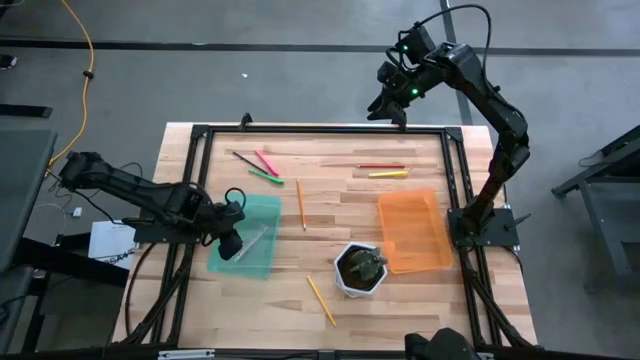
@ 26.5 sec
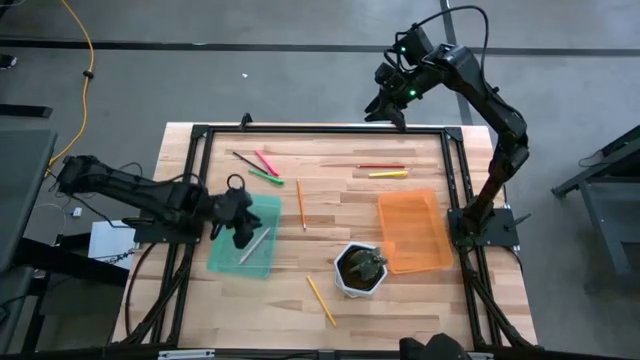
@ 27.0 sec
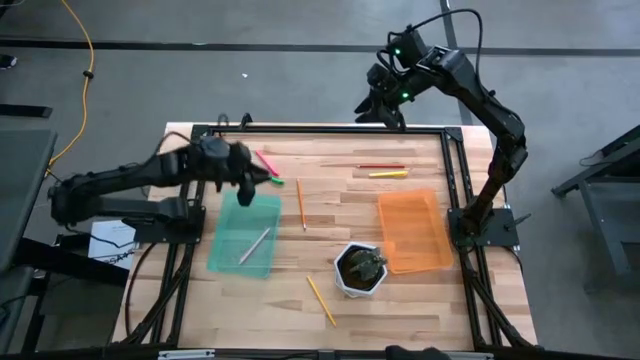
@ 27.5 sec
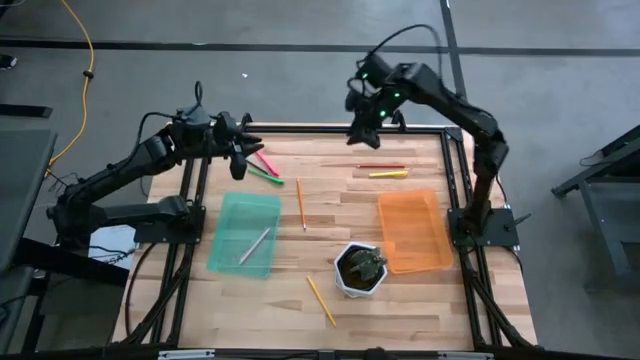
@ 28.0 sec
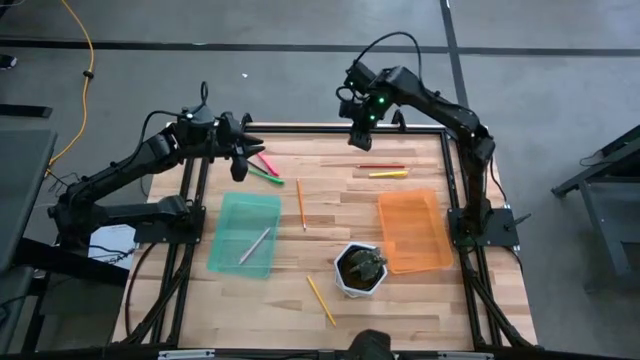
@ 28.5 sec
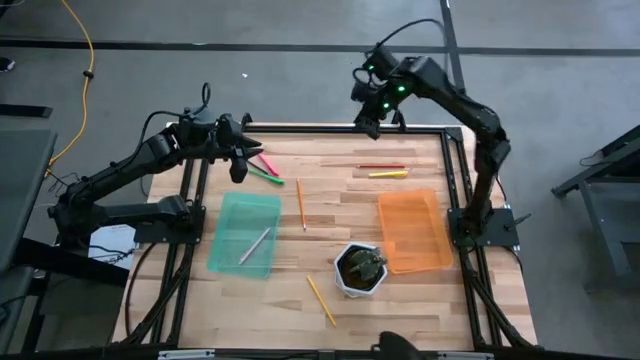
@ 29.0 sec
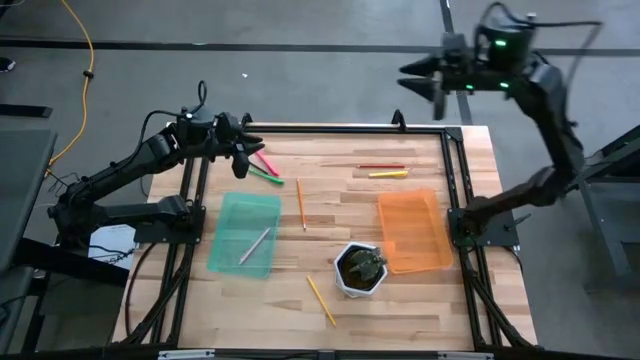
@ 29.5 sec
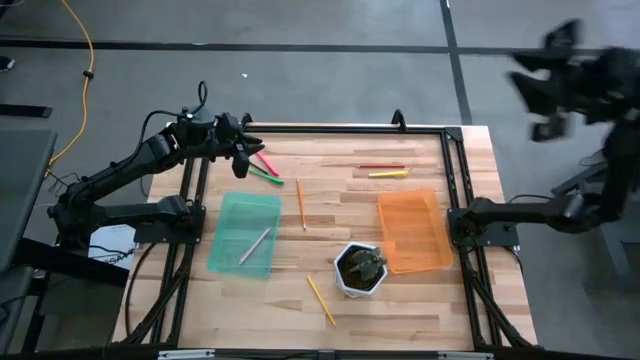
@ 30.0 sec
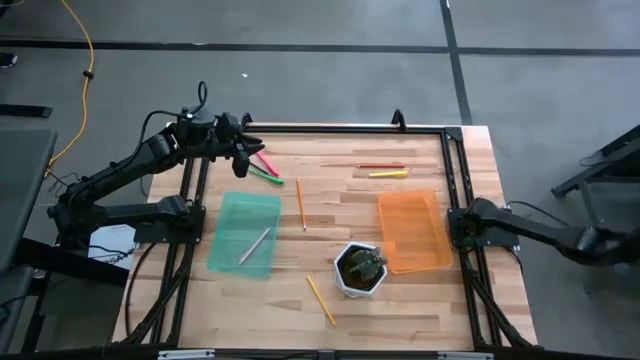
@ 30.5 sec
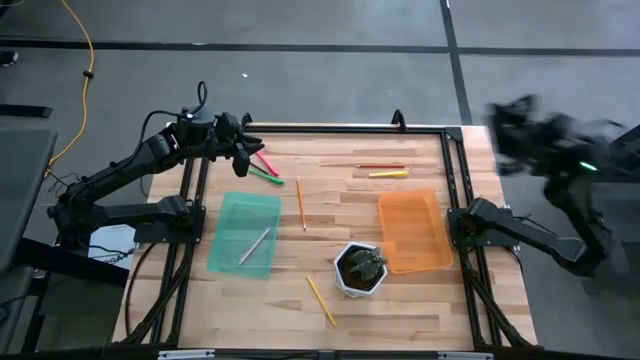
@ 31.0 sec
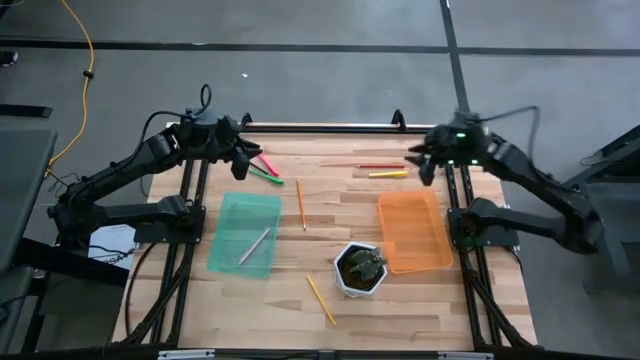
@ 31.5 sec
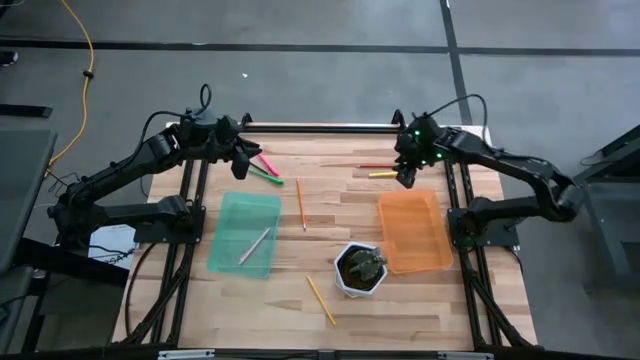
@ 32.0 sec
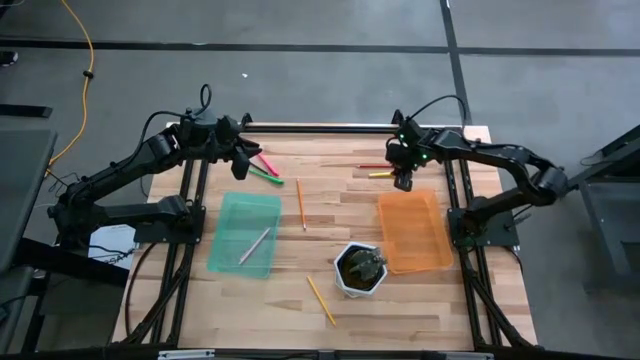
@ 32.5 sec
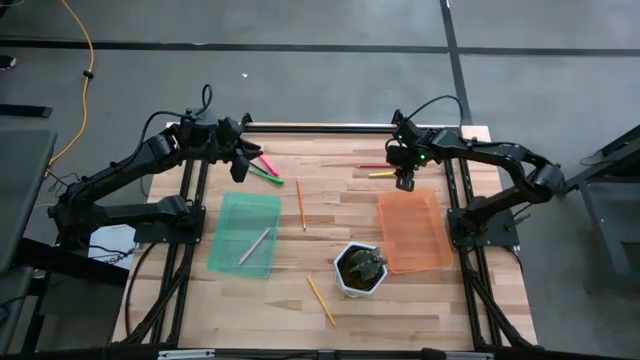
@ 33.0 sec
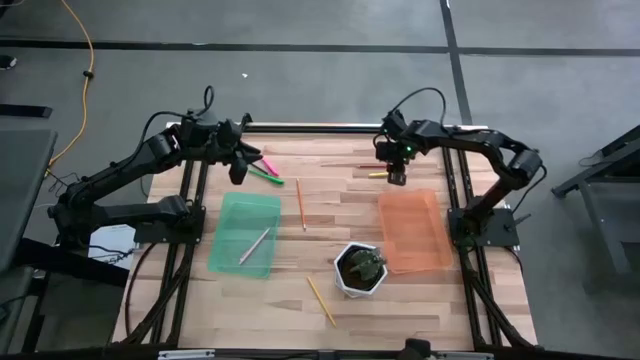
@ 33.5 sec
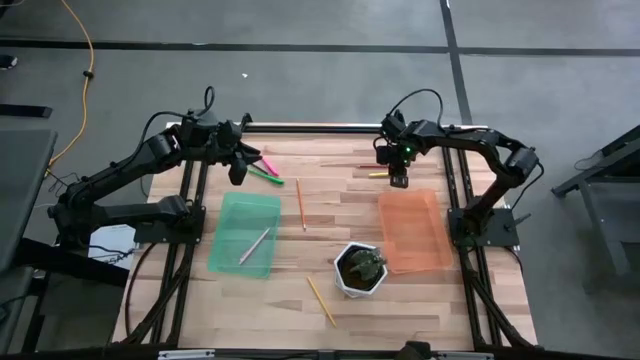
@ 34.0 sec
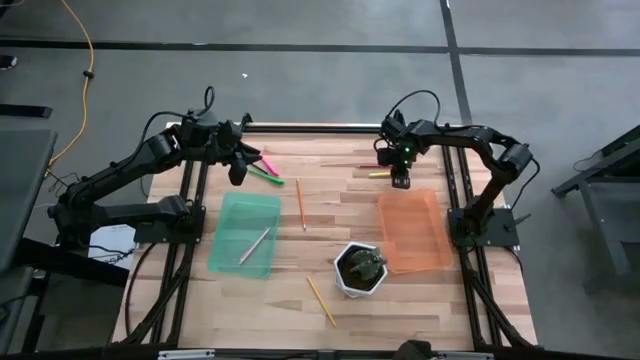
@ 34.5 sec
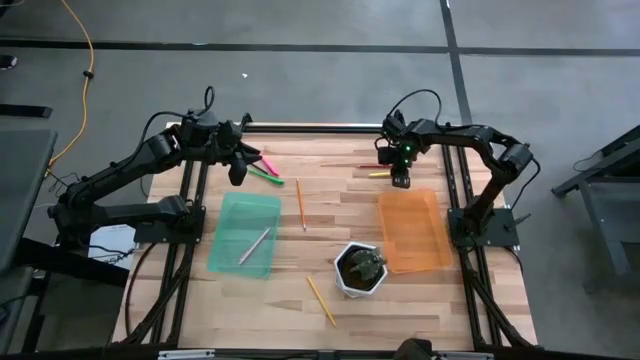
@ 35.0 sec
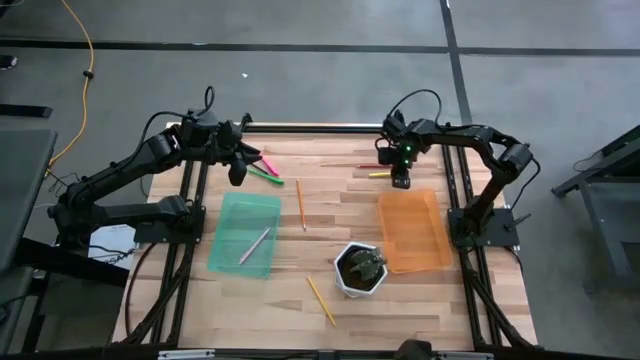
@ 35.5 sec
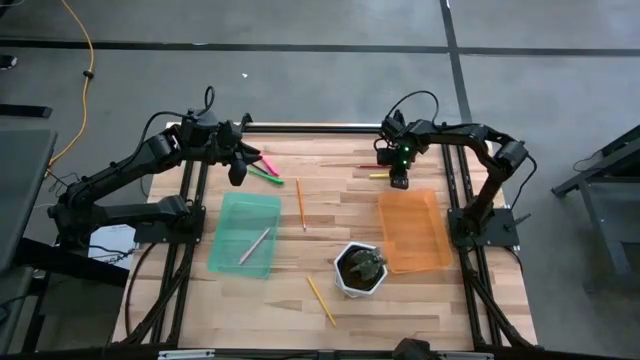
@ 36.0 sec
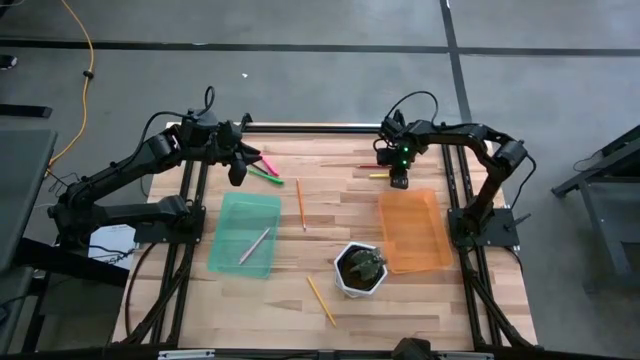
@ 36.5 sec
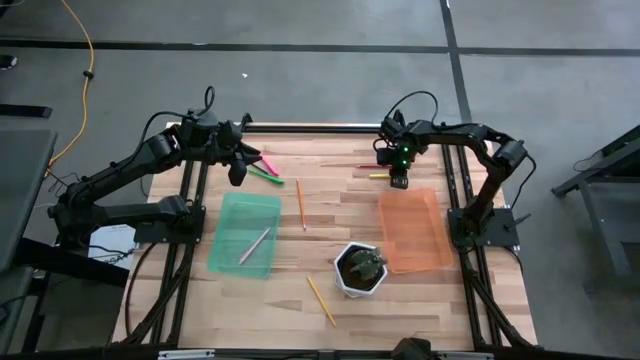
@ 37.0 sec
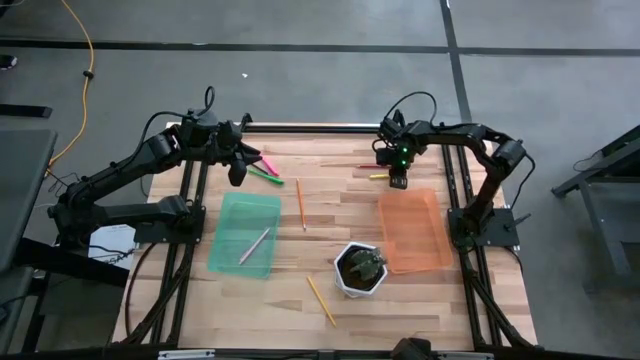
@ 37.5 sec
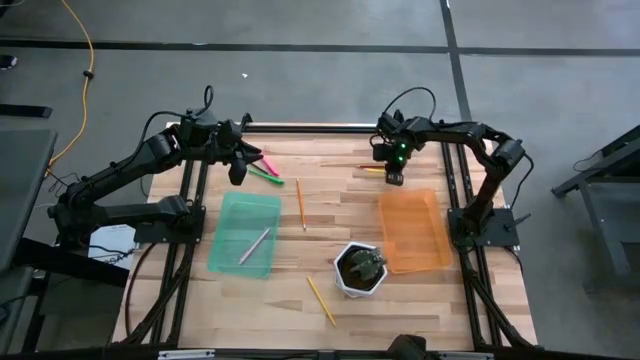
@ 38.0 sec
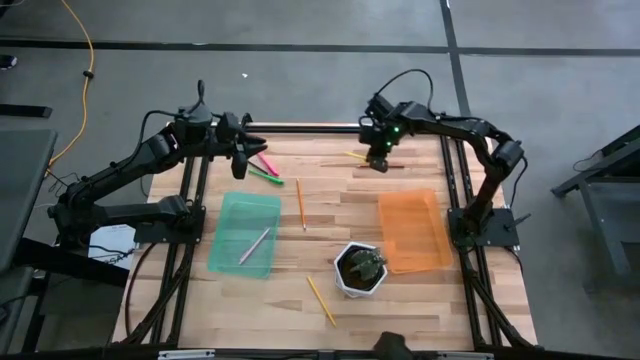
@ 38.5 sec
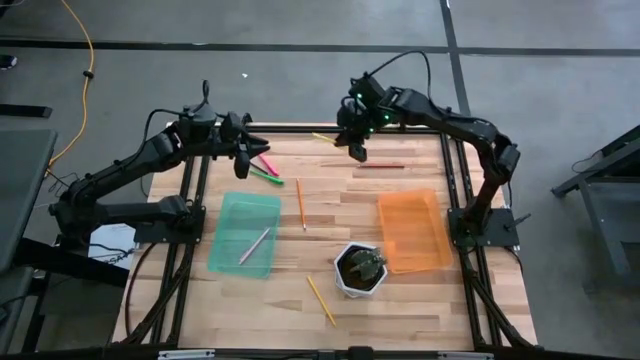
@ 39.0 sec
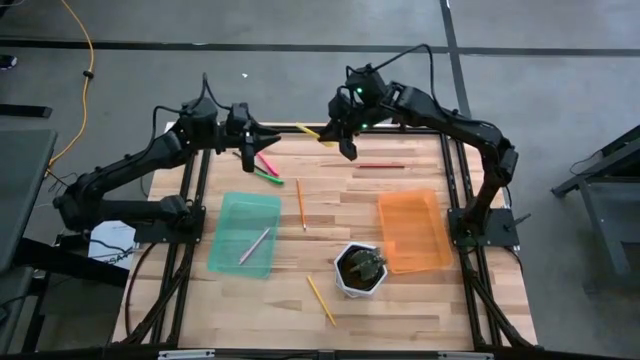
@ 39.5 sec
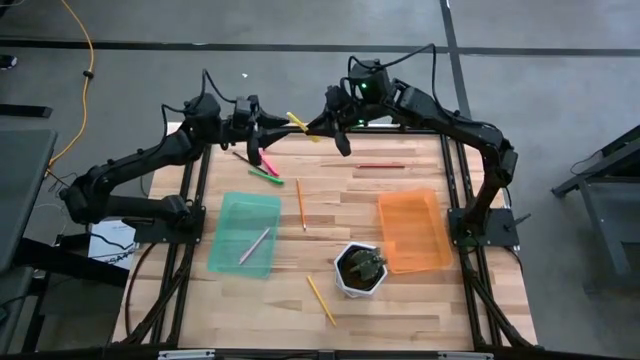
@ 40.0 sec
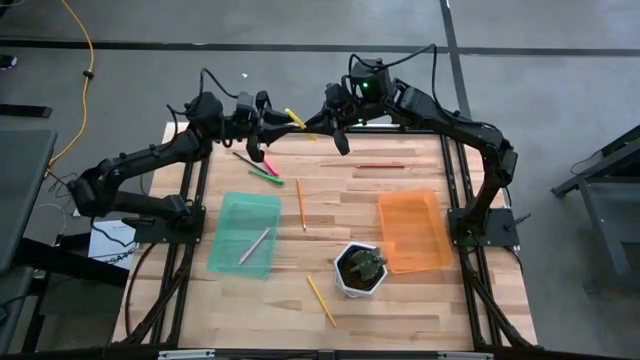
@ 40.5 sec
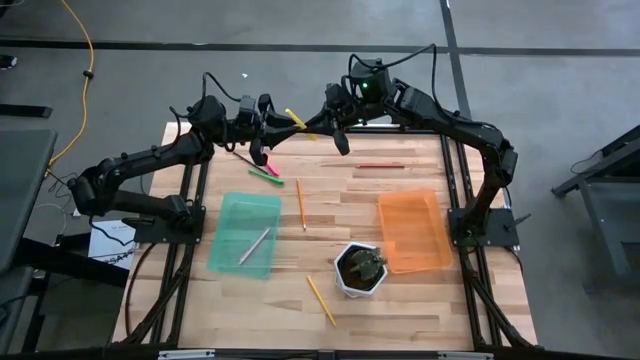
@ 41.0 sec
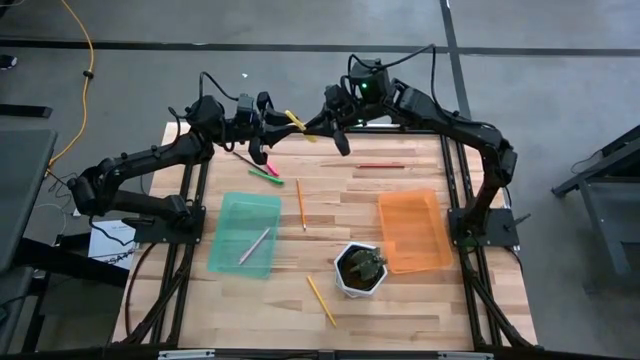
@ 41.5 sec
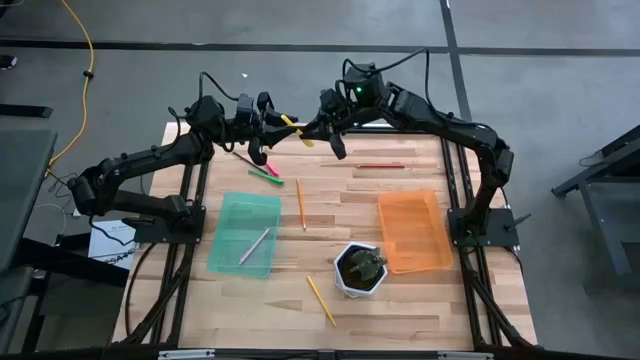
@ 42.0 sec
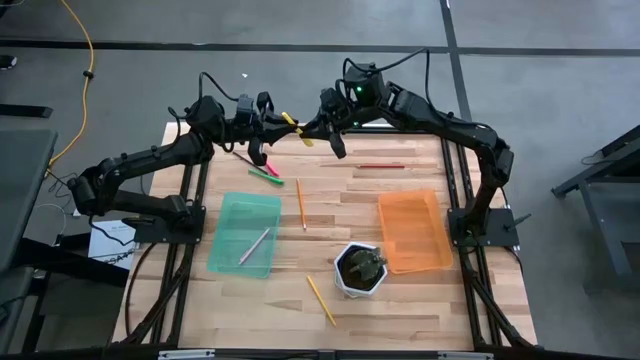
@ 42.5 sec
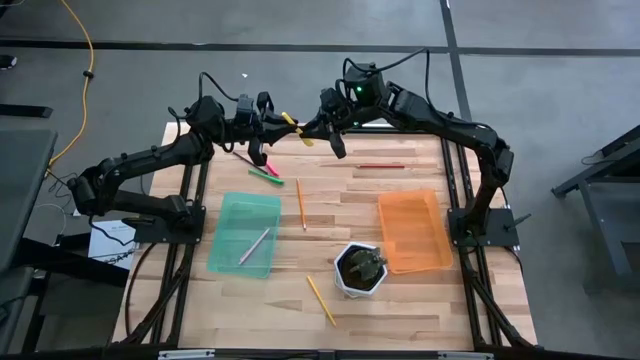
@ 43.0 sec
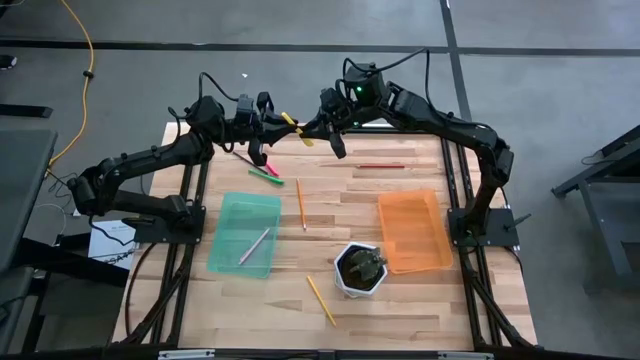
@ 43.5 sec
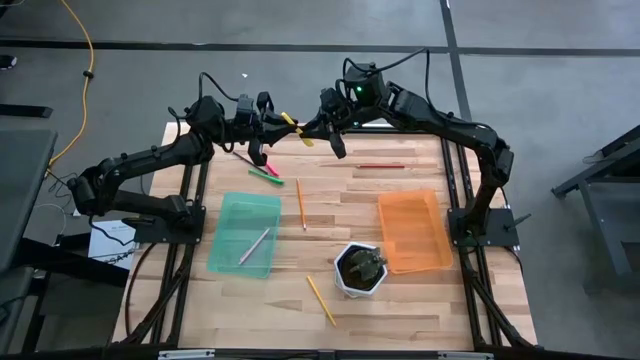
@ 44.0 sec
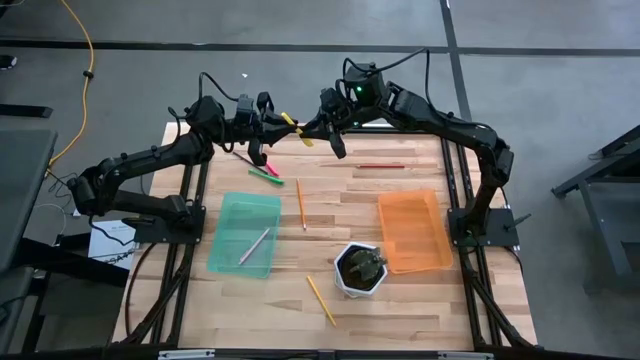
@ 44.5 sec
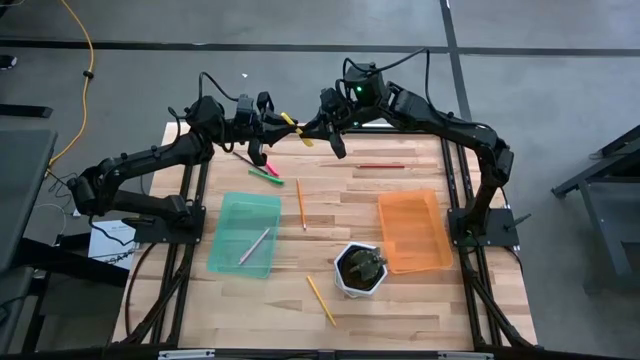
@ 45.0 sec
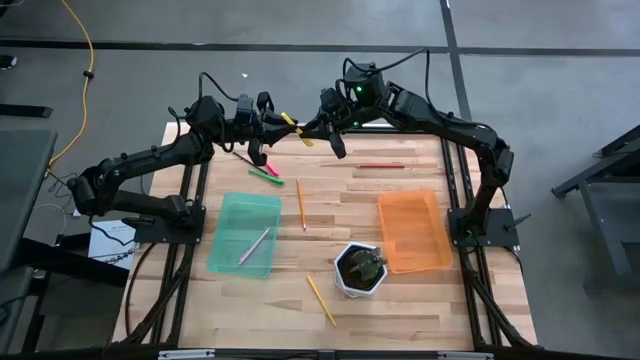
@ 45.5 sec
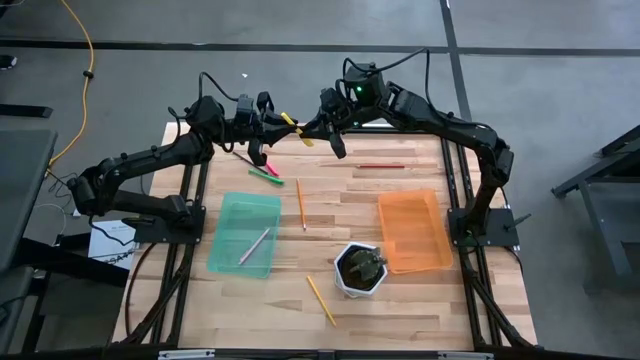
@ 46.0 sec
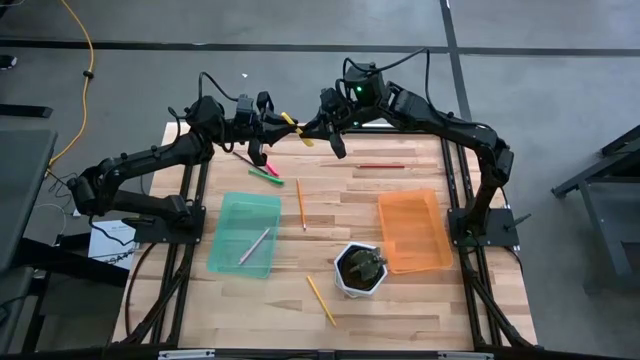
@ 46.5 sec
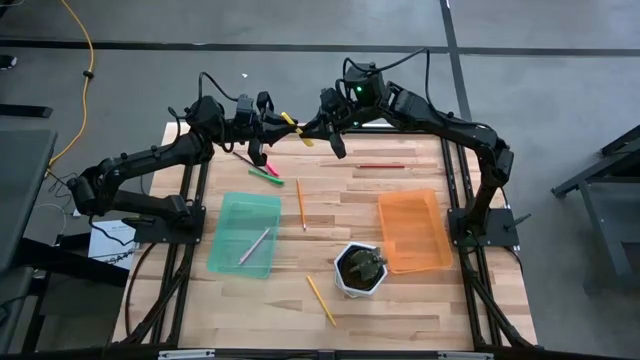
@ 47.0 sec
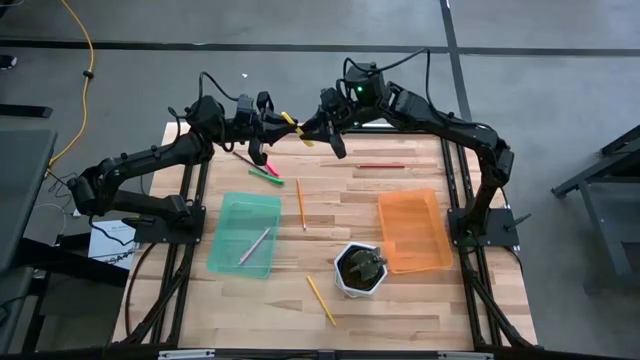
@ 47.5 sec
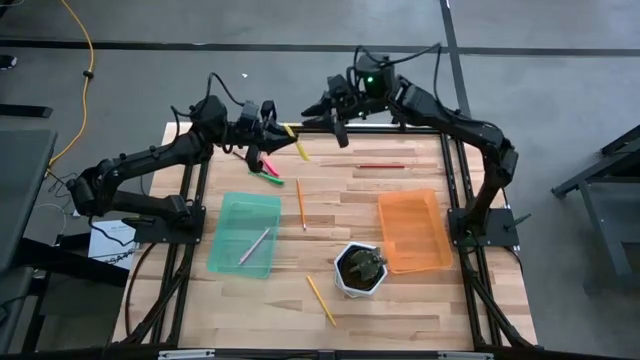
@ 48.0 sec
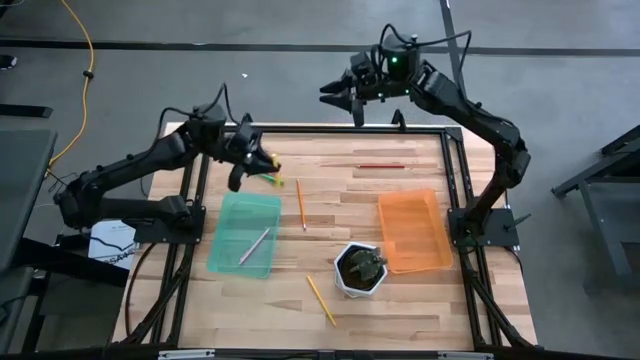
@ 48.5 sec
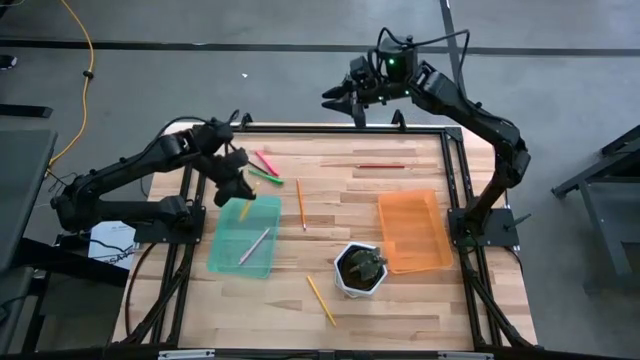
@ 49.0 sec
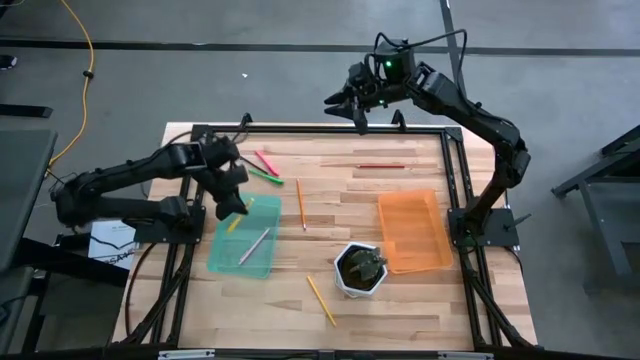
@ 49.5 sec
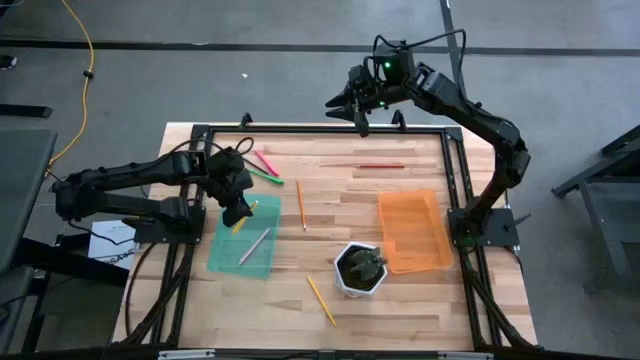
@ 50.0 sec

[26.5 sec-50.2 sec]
Task: Sort pens & pencils
Put the yellow pen into the green bin
